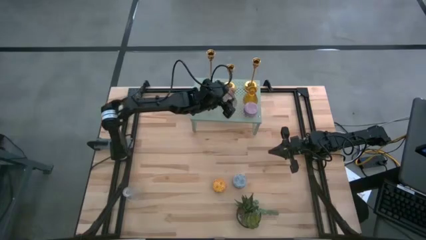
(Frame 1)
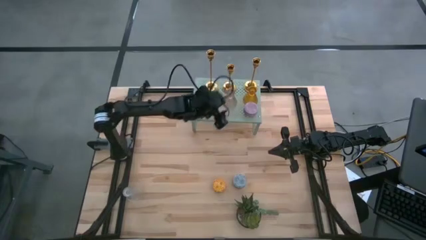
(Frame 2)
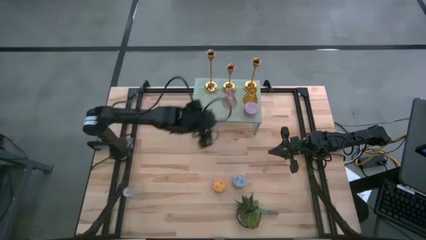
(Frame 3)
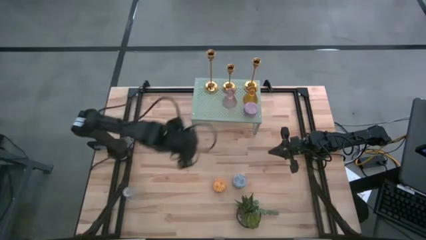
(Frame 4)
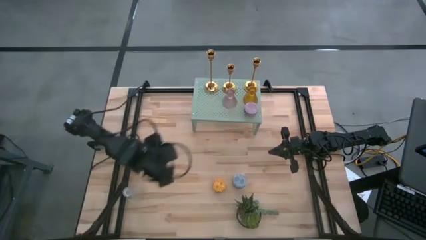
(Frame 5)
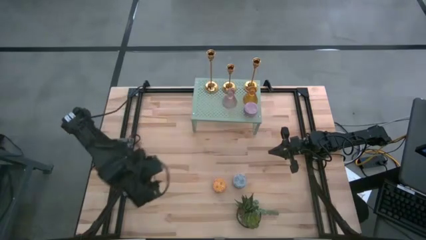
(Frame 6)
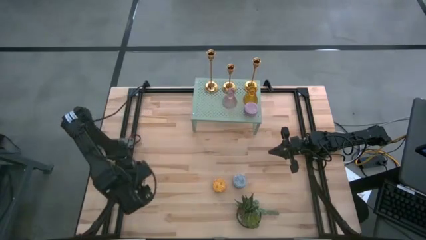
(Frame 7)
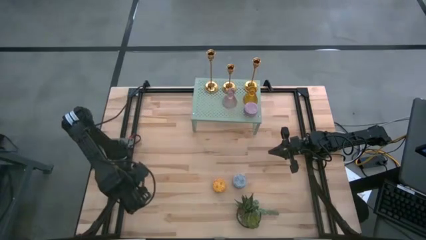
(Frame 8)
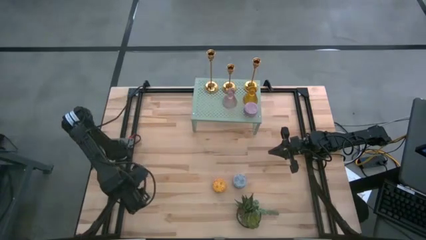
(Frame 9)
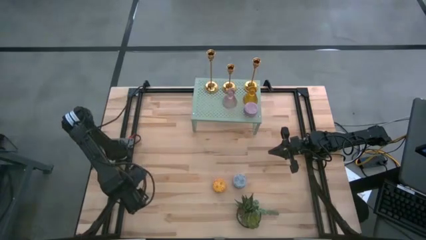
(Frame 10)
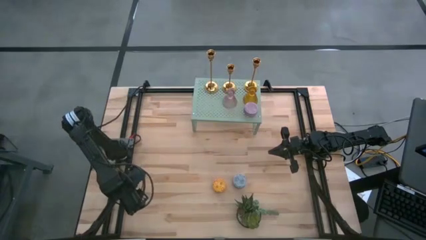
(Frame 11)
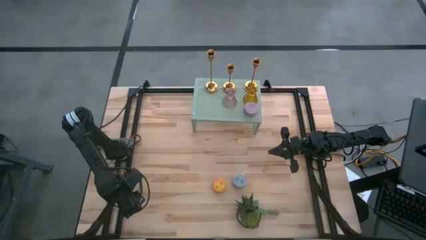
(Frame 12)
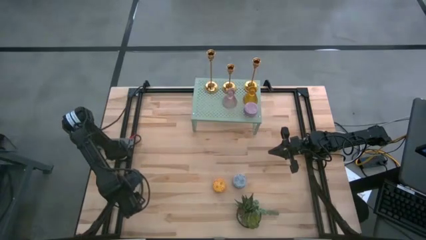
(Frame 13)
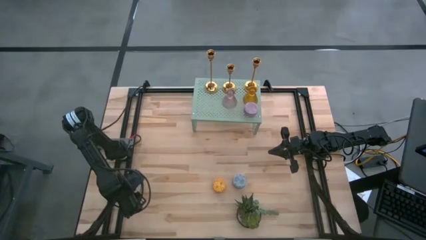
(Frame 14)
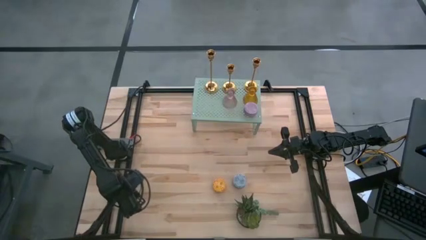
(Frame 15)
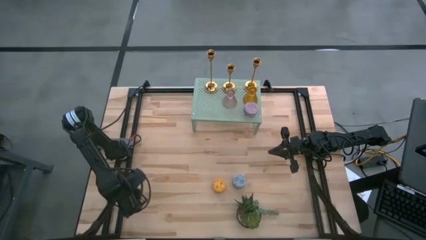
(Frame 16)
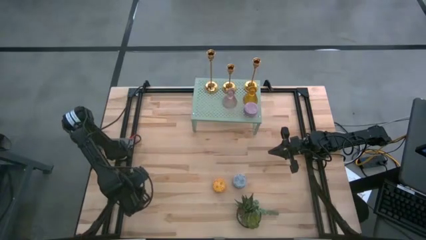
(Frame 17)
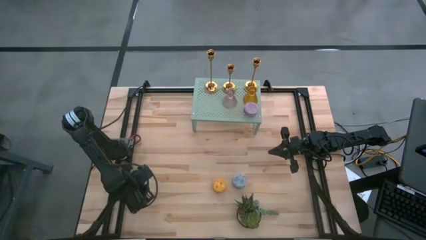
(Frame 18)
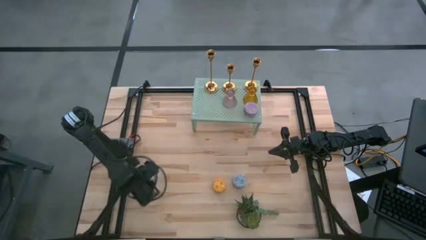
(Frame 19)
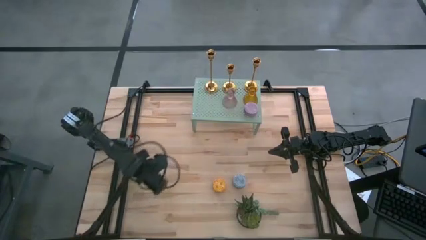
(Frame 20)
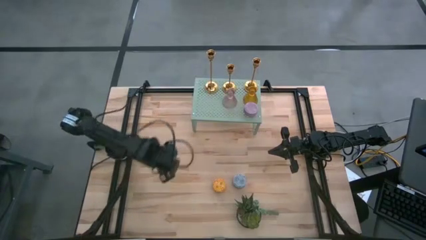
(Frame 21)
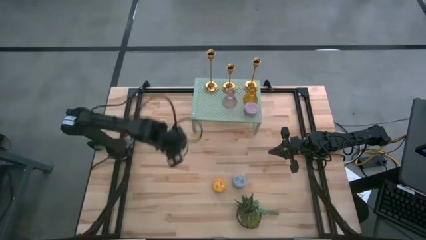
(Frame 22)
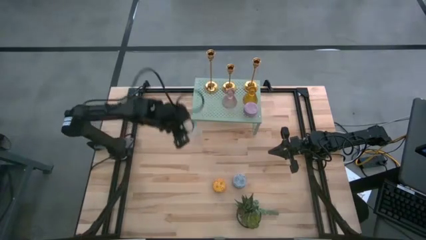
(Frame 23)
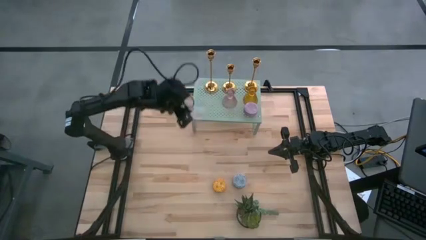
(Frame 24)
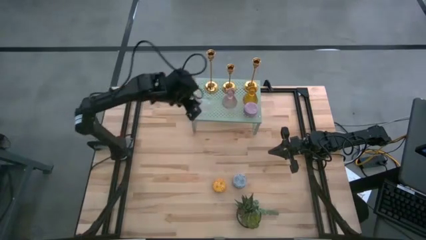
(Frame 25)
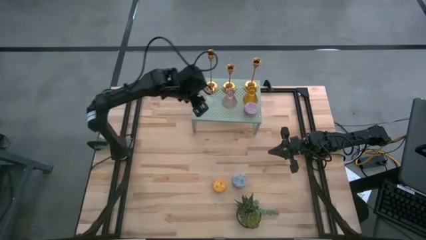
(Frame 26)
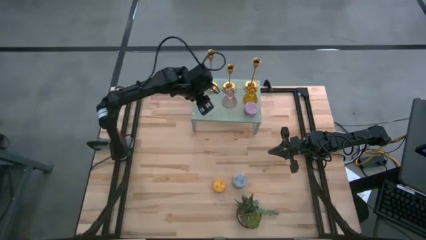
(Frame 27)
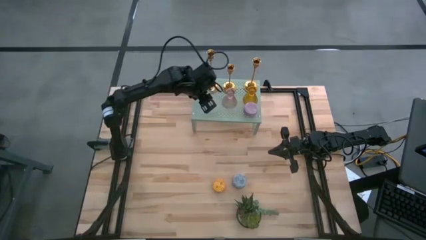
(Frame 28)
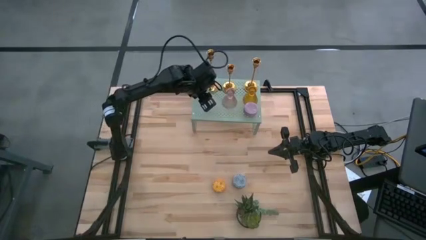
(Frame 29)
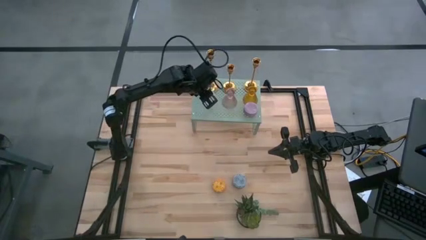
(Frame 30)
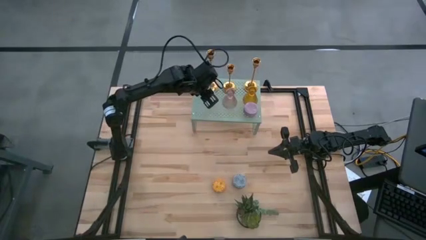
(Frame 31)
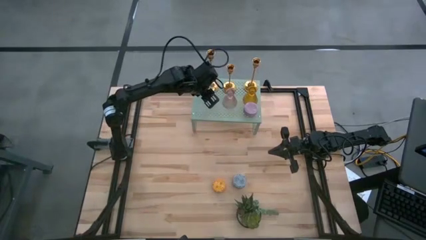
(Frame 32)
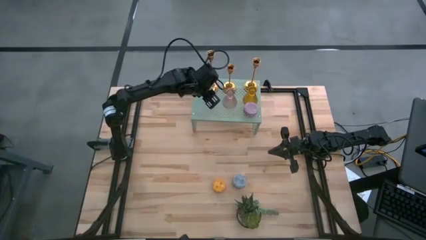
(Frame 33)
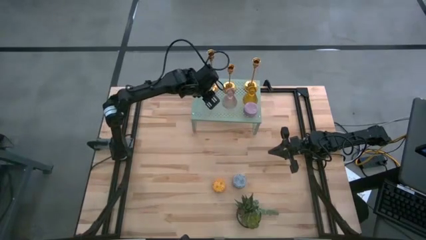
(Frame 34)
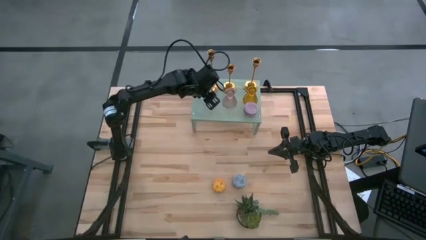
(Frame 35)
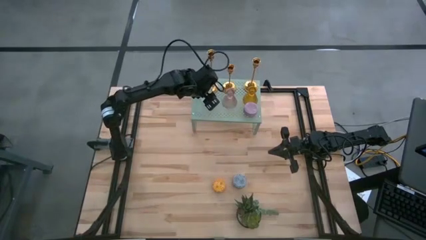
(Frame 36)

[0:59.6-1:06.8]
Task: Pick & Place candle stick holders
Put the transparent candle holder on the shelf

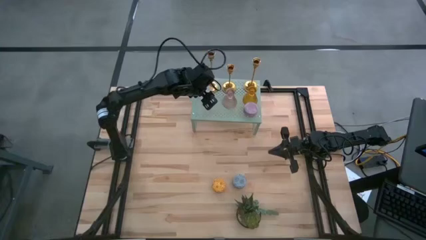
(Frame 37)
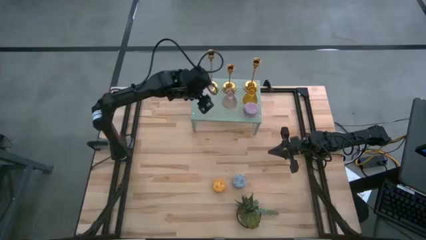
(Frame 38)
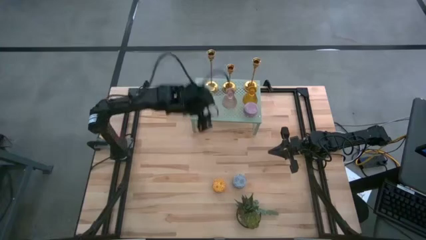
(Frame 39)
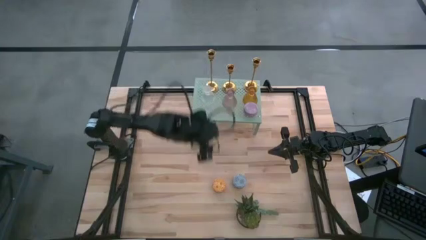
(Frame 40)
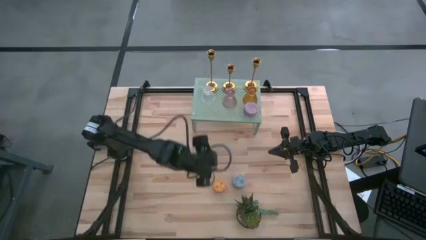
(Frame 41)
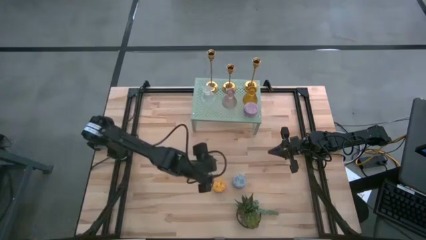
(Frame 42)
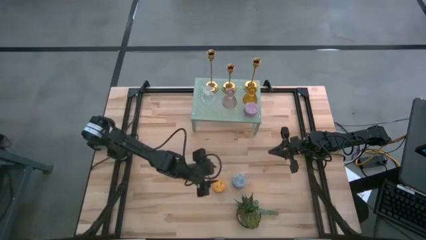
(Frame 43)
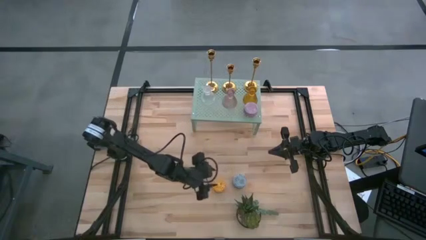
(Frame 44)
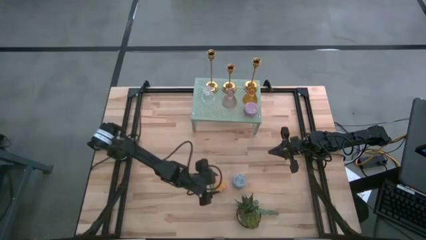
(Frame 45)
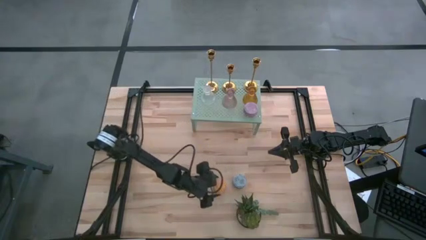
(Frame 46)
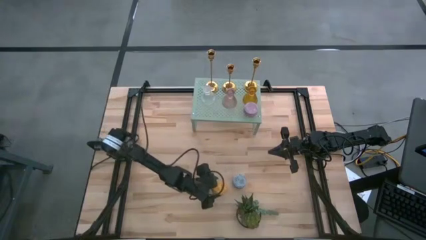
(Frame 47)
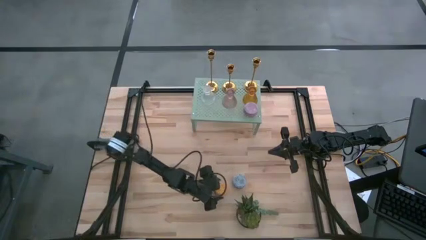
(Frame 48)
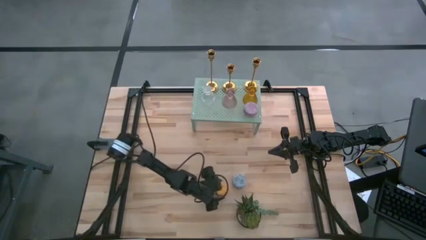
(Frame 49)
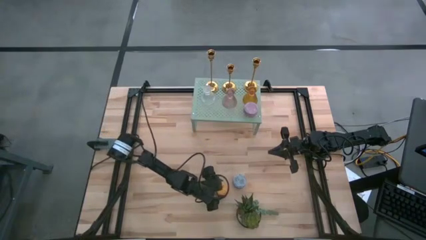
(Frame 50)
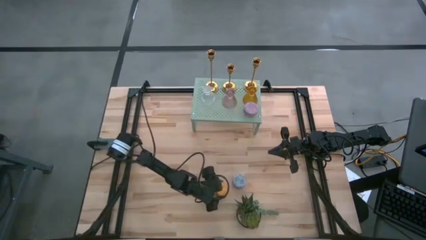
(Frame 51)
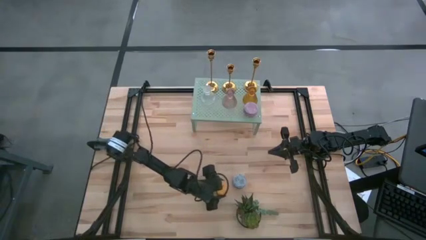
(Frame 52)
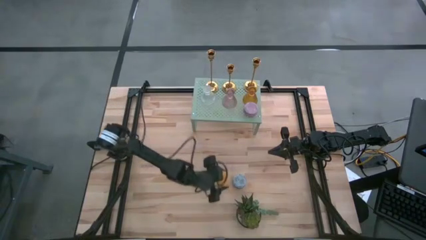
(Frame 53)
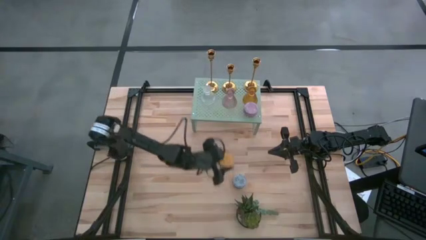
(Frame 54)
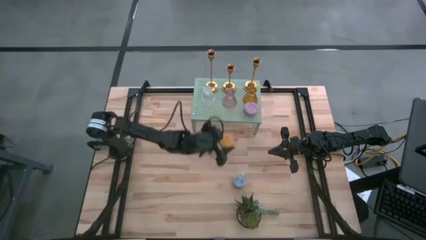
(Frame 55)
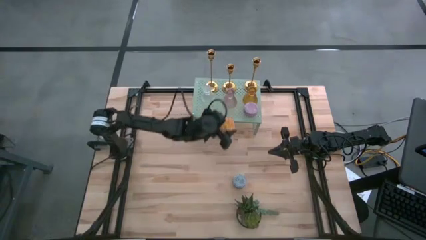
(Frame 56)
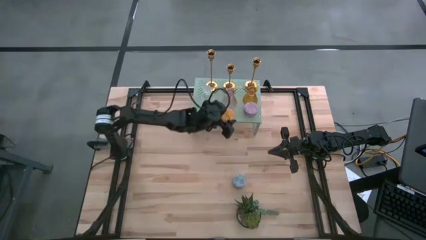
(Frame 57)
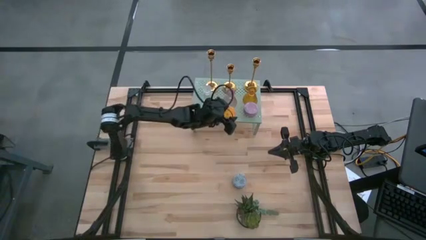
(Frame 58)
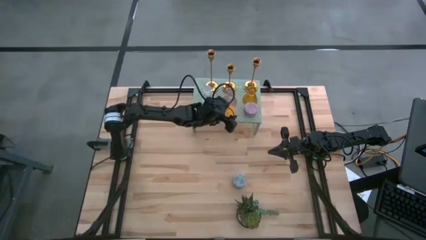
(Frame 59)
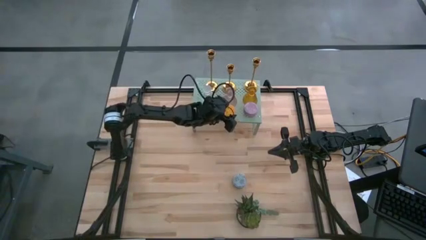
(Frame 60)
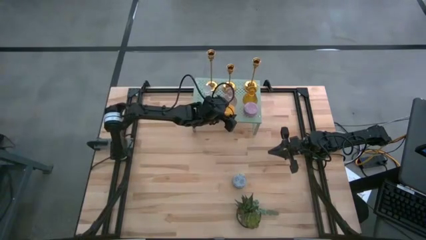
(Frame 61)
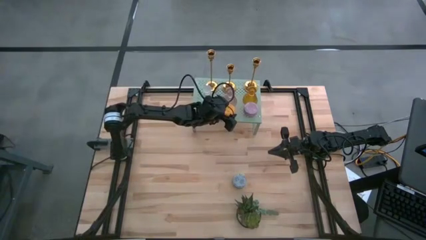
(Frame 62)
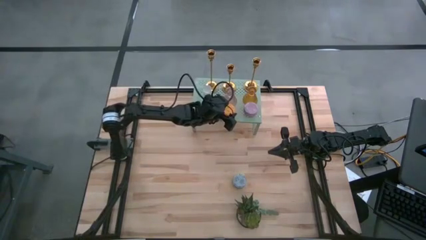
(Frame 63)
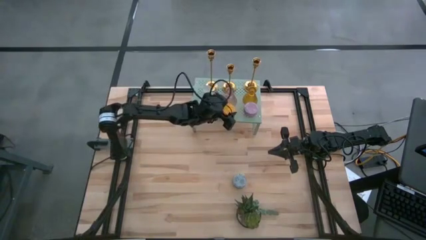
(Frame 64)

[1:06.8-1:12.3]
Put the yellow scented candle on the shelf

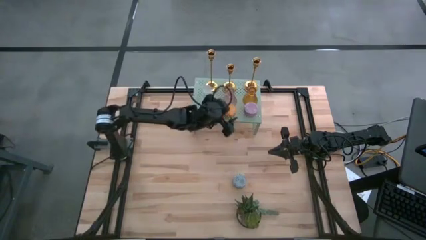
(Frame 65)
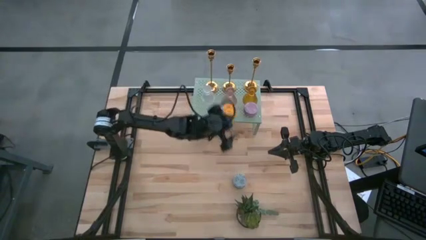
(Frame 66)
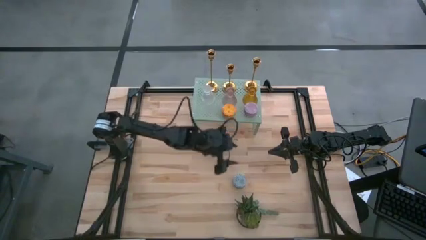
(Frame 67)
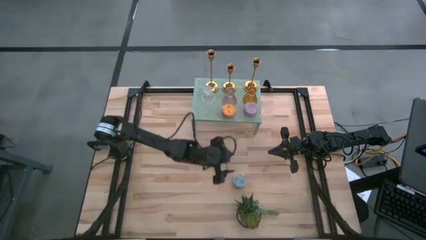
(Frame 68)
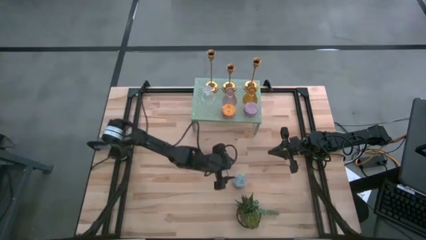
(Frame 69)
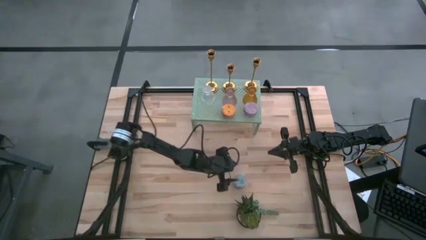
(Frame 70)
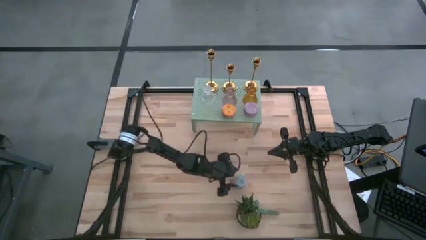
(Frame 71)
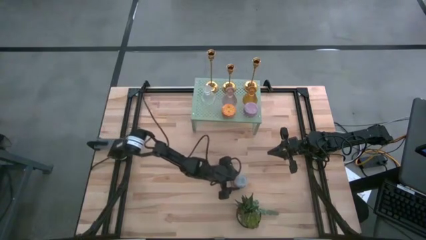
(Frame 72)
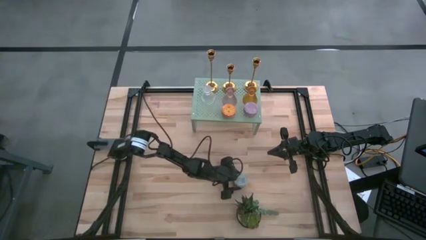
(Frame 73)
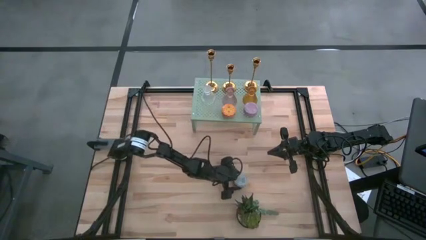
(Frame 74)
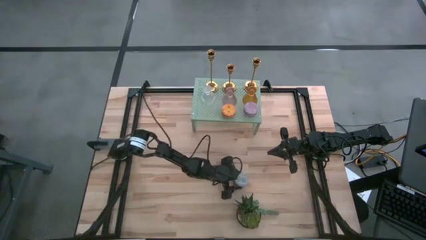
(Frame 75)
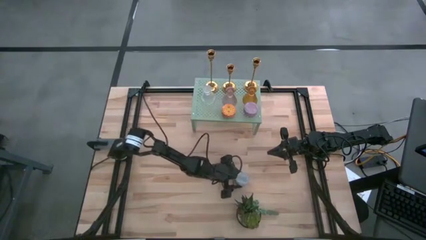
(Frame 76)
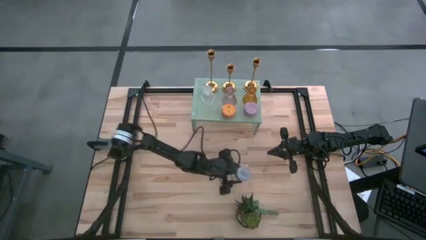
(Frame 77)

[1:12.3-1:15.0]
Put the blue scented candle on the shelf
